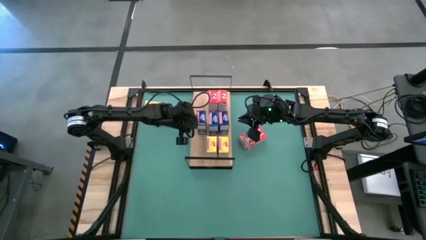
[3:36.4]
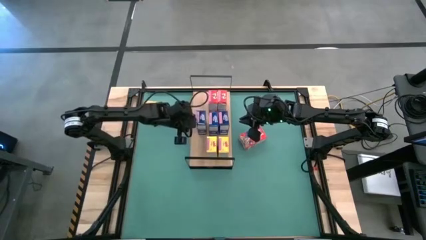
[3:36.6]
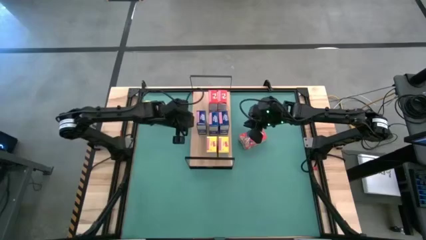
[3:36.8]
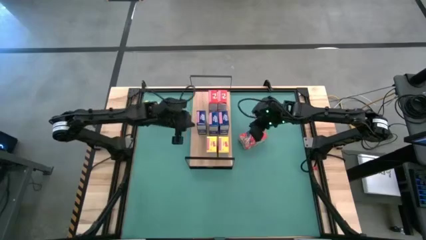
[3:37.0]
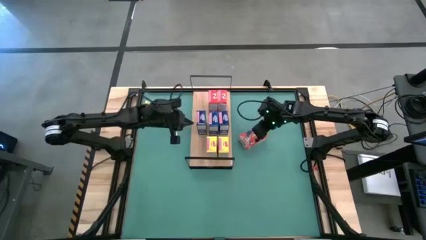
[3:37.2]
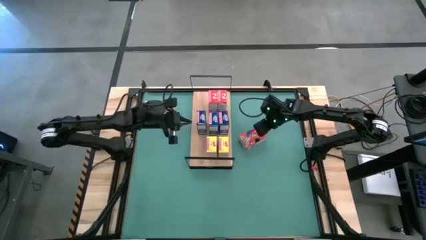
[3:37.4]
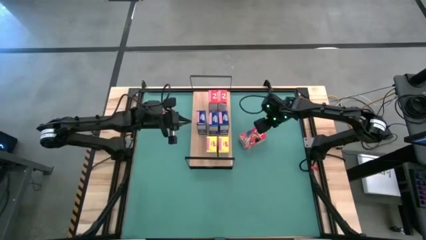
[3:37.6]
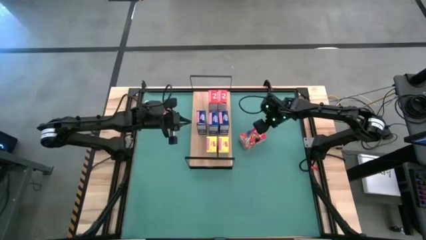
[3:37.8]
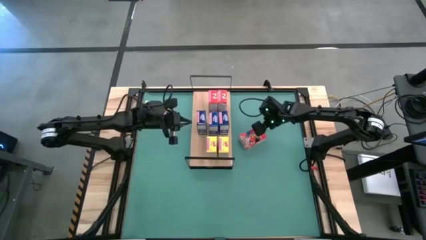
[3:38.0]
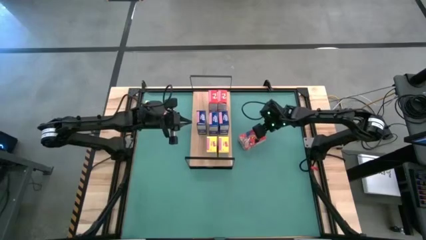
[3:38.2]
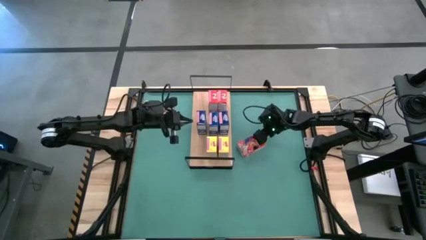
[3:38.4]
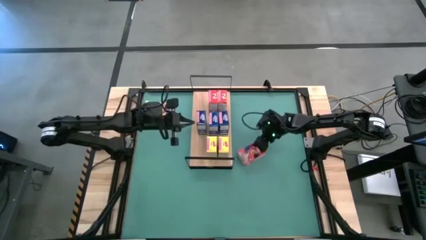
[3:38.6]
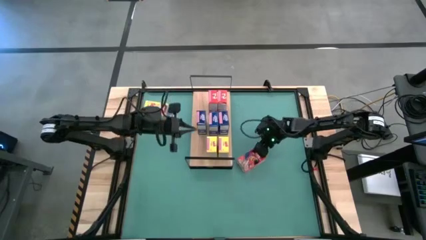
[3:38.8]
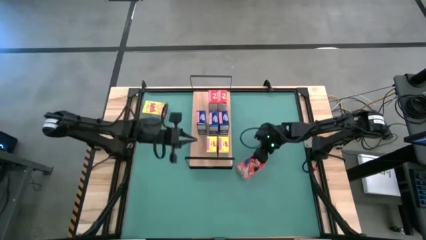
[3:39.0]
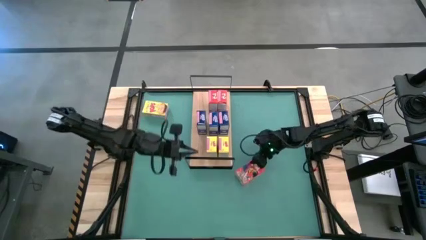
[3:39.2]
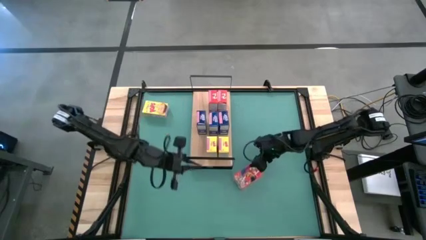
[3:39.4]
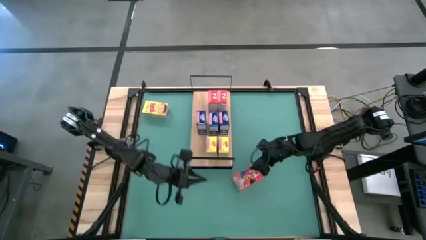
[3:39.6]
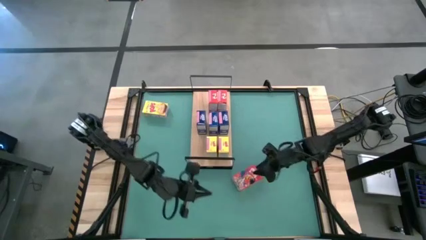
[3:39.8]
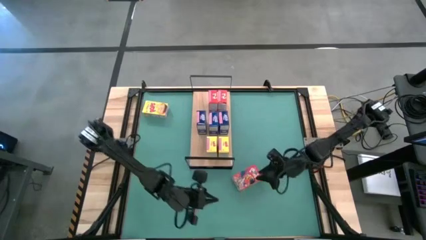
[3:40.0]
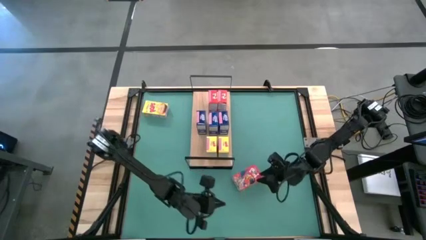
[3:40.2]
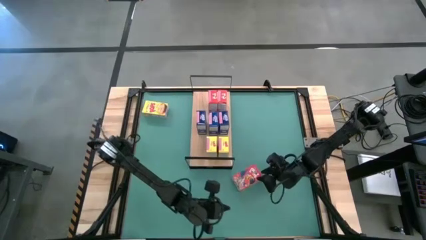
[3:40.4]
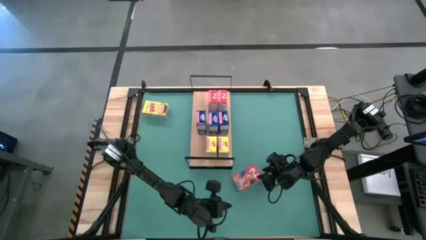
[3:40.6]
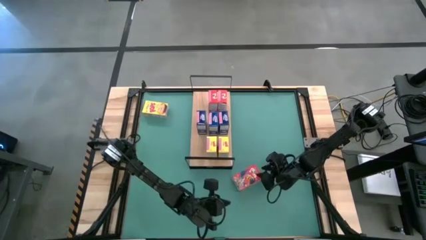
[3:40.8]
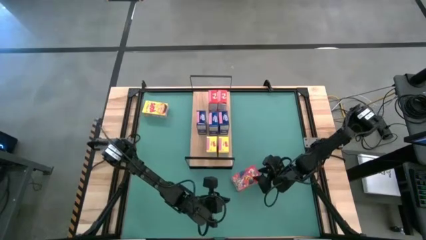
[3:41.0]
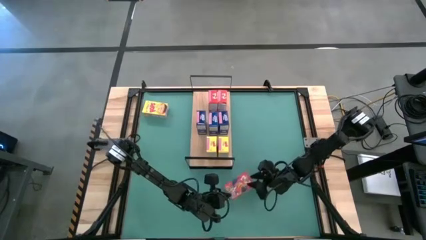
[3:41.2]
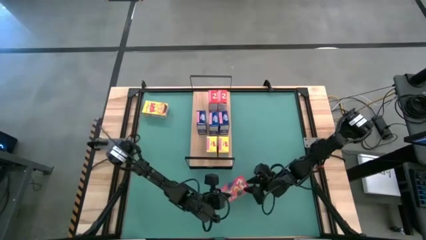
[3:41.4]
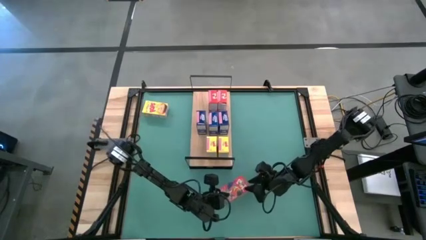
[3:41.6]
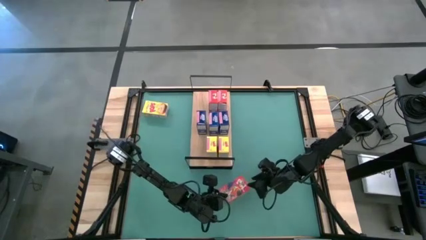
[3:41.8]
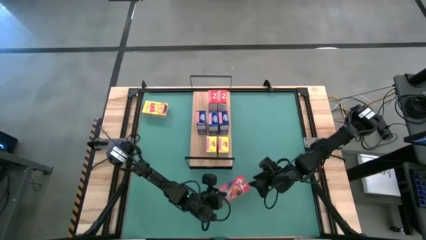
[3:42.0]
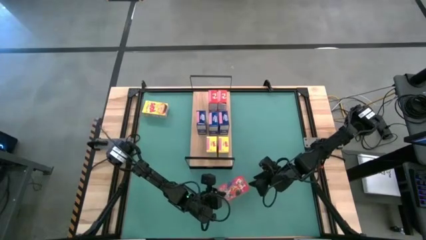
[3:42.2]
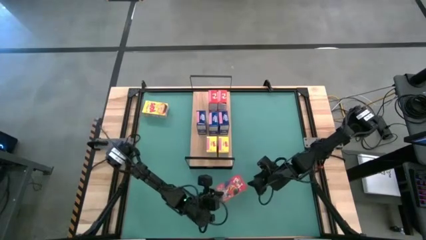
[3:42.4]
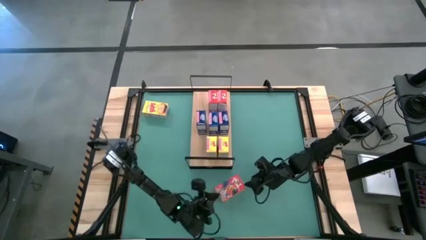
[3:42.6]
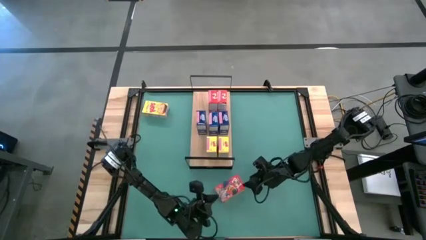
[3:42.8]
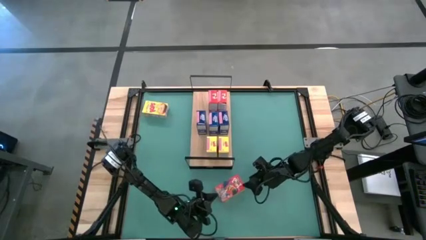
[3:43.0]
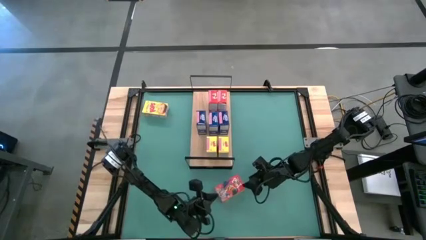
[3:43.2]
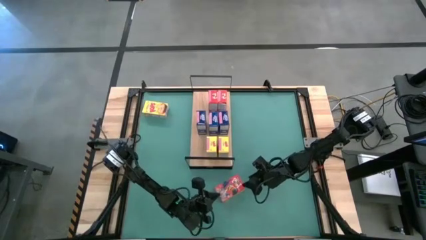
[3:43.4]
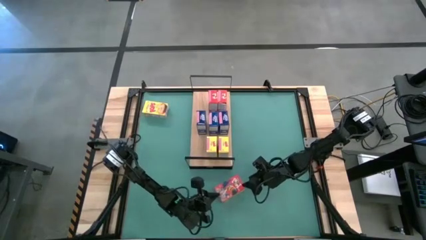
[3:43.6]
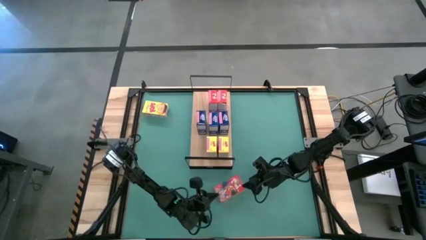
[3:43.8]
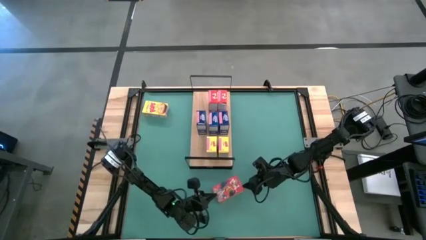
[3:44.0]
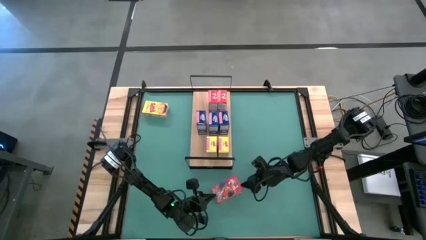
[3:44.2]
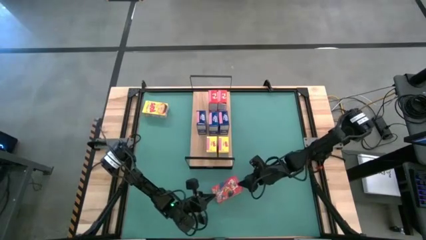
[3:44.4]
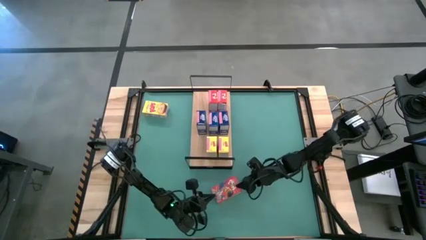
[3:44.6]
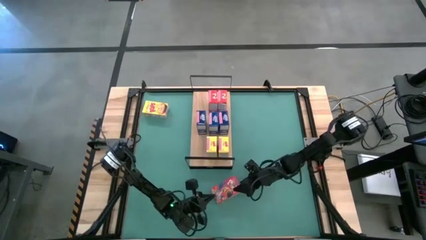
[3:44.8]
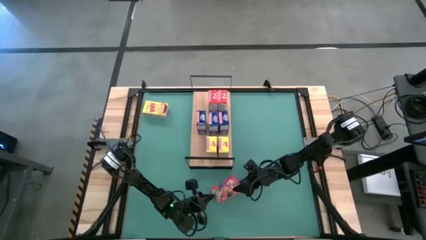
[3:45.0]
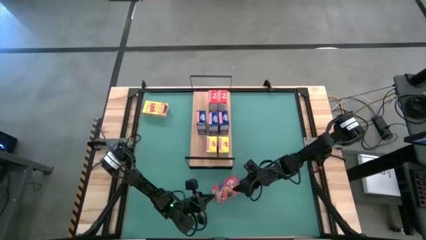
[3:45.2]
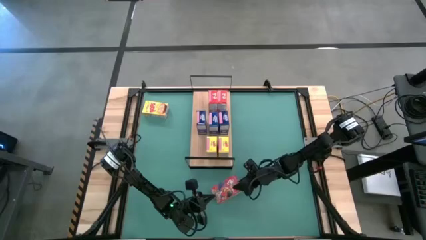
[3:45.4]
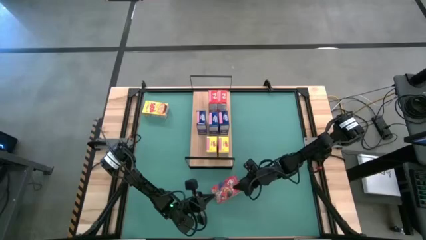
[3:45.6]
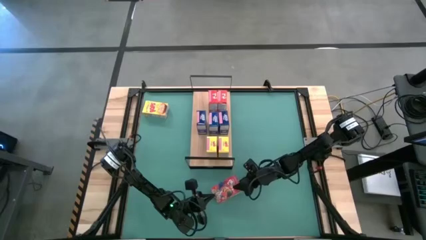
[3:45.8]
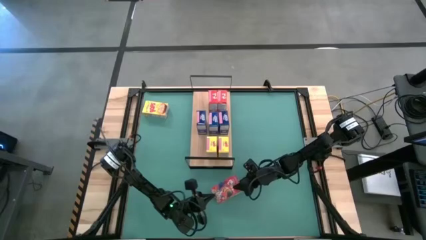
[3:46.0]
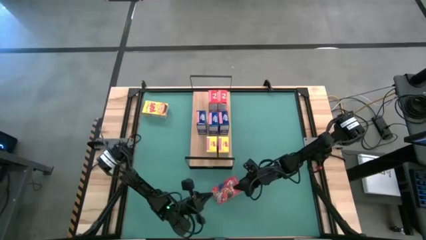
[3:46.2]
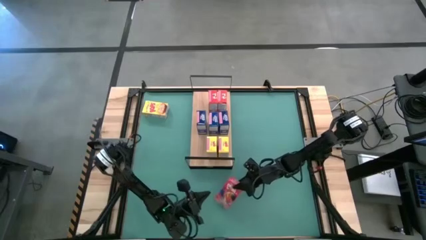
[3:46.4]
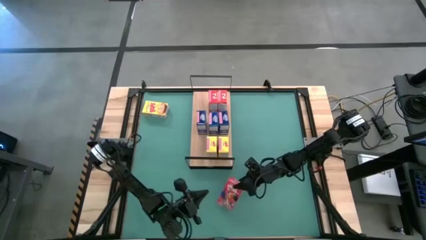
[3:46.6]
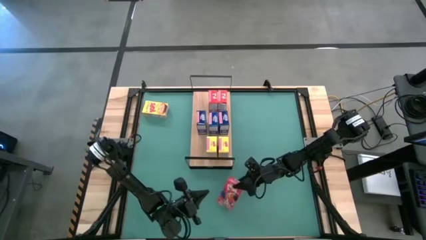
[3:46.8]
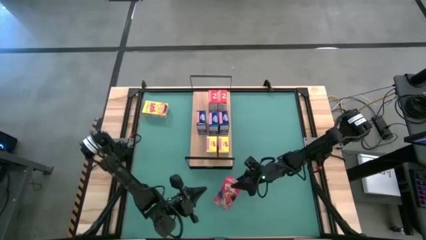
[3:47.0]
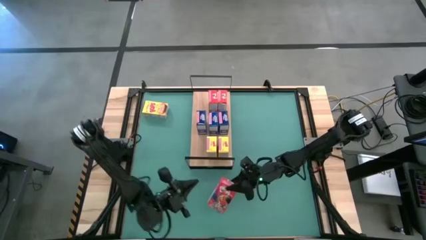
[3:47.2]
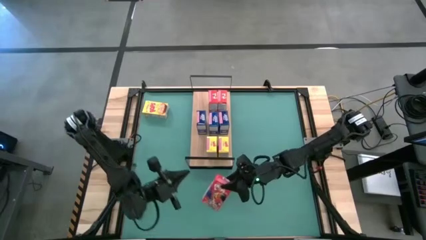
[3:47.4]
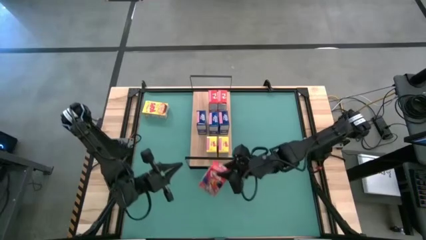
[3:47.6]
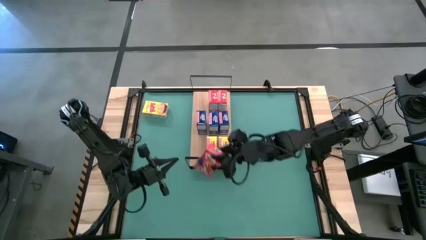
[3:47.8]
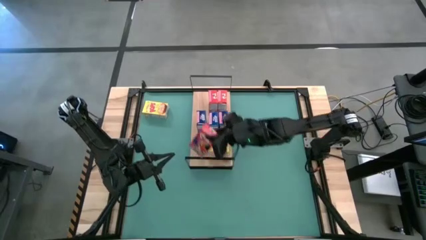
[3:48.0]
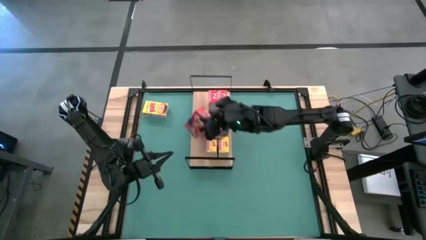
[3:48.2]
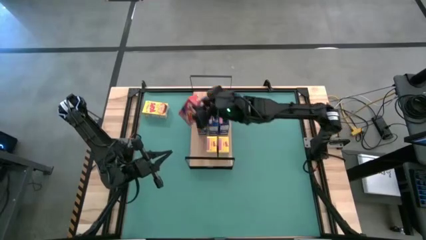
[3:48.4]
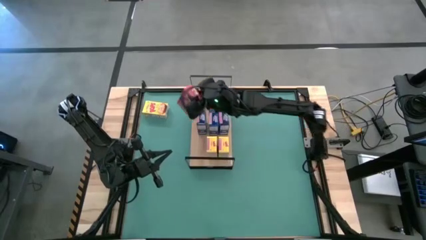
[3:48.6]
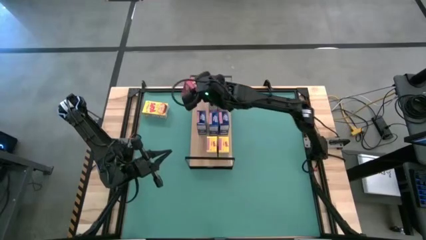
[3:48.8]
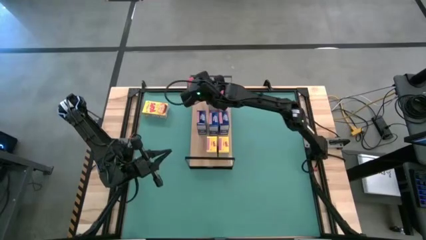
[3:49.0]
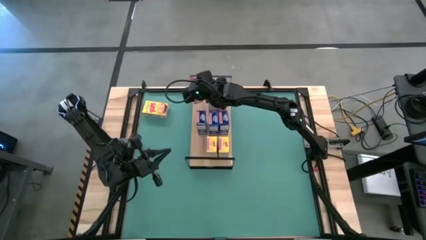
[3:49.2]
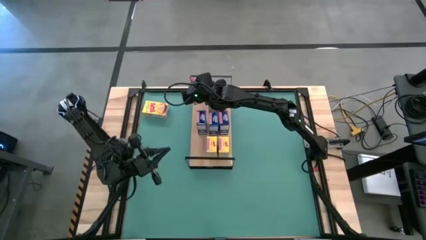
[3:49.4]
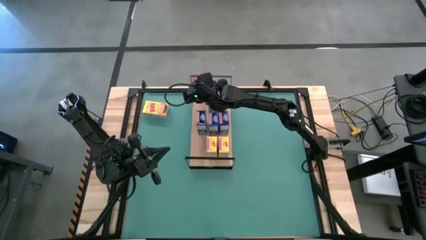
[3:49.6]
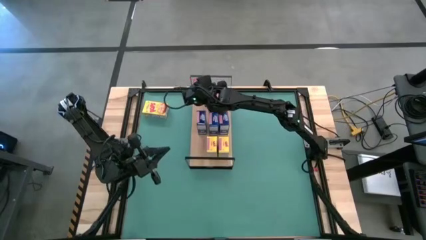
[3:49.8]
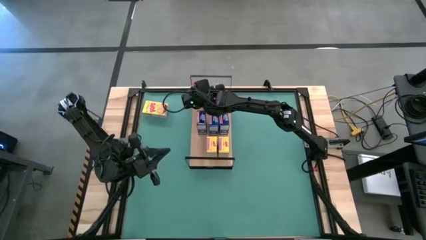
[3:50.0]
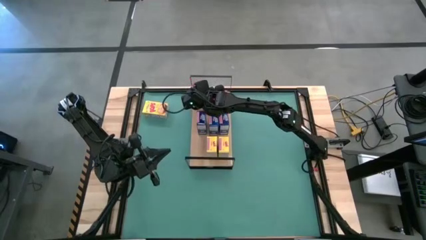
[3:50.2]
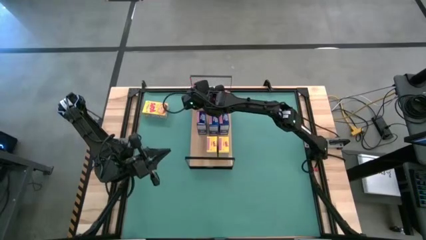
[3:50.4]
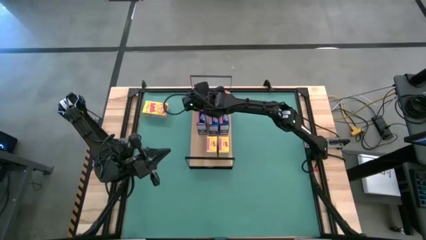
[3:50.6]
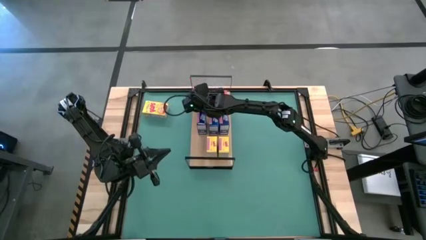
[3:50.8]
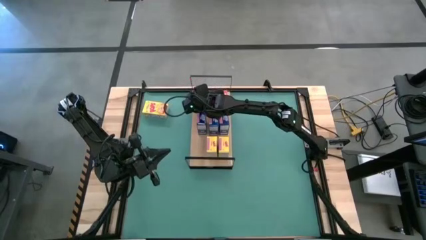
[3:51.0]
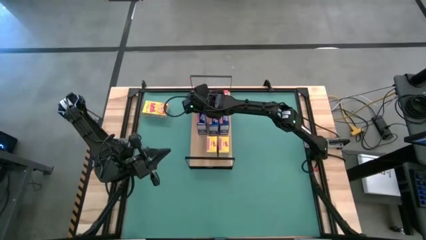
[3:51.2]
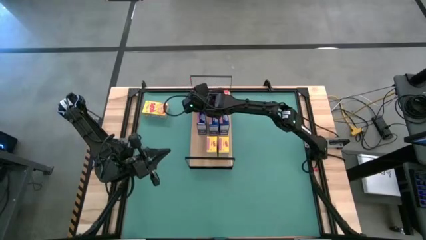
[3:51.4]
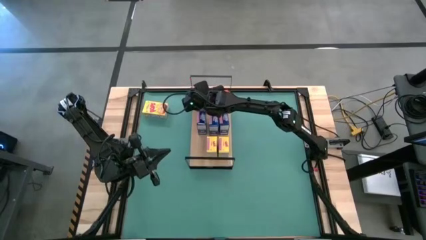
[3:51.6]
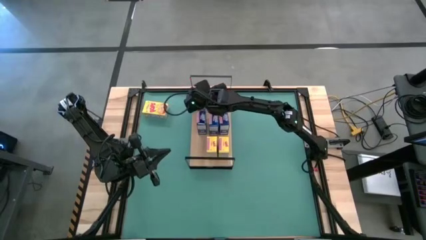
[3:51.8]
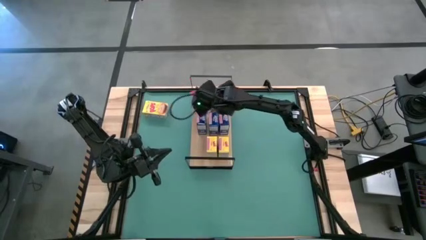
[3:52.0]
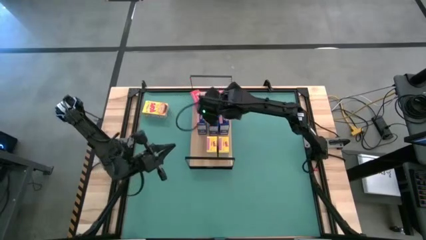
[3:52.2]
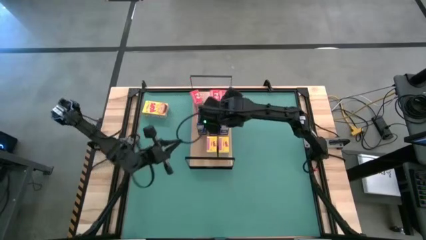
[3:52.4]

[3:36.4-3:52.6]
Task: Stack cereal on shelf
Put the red cereal box on the shelf aligned with the other red cereal box
